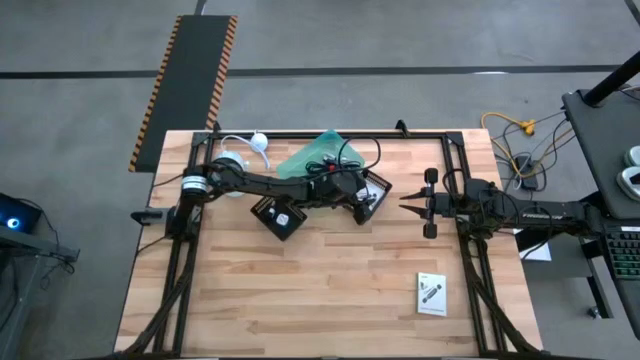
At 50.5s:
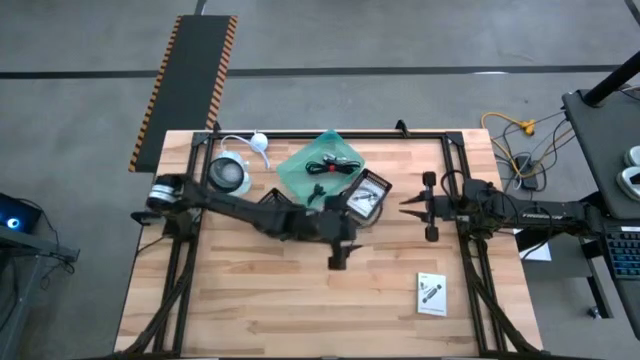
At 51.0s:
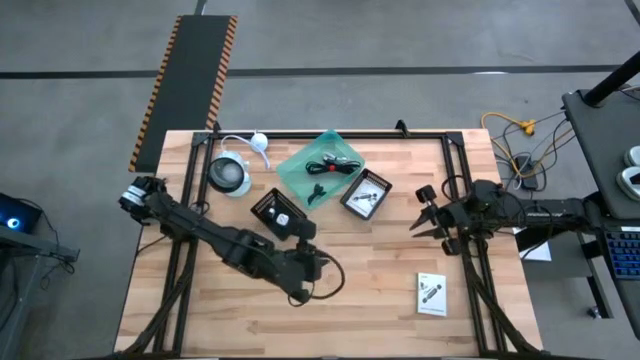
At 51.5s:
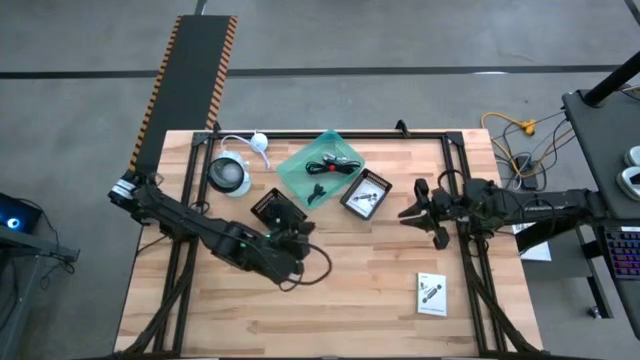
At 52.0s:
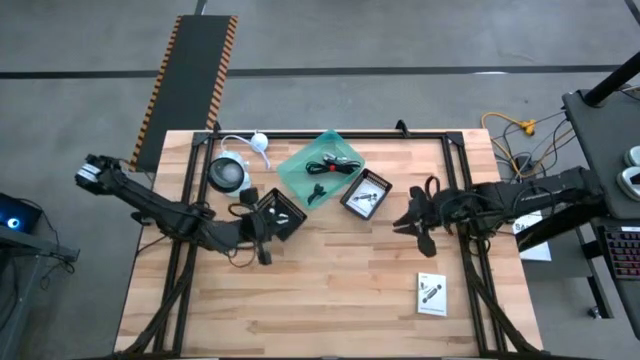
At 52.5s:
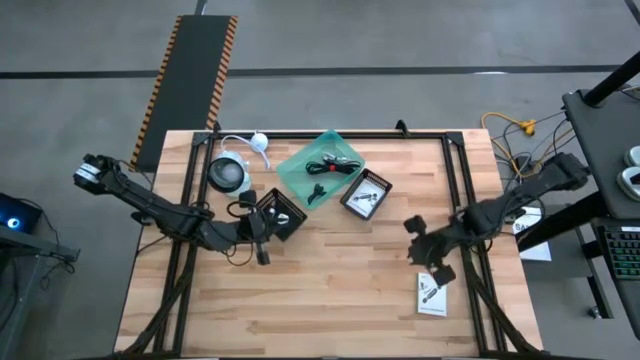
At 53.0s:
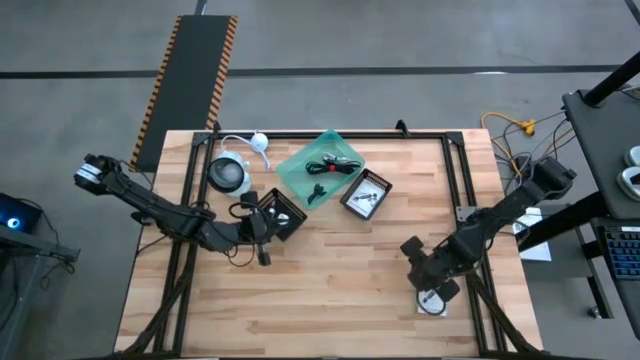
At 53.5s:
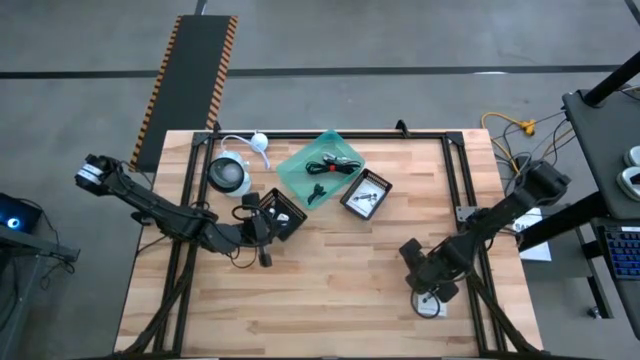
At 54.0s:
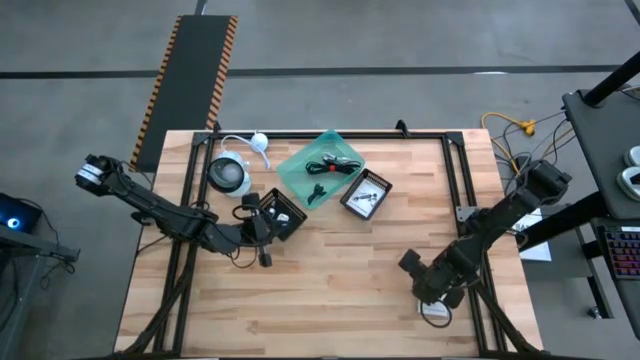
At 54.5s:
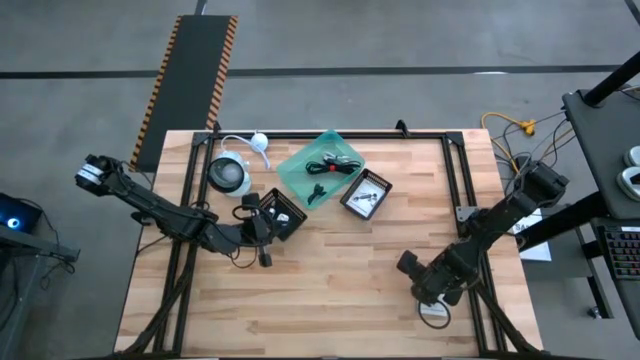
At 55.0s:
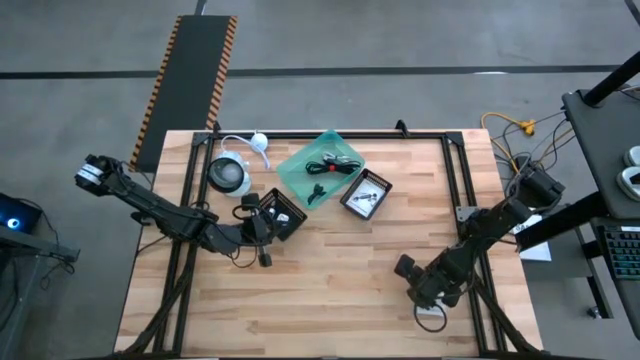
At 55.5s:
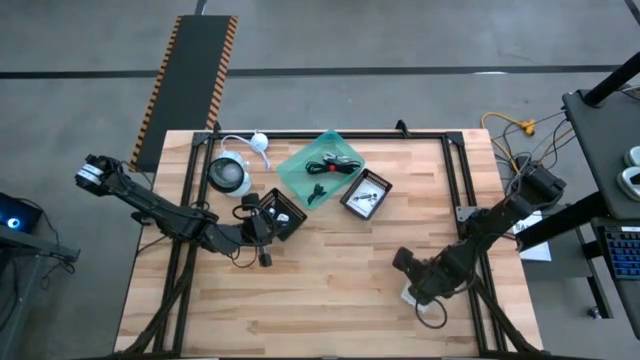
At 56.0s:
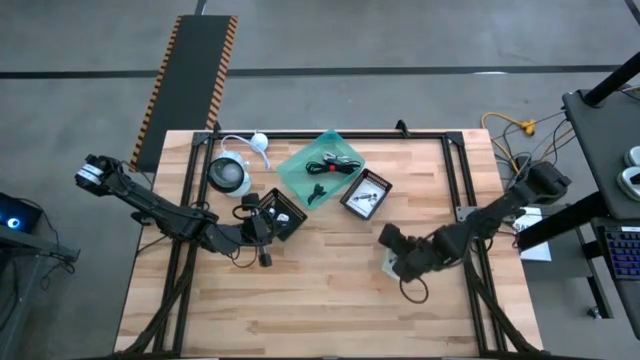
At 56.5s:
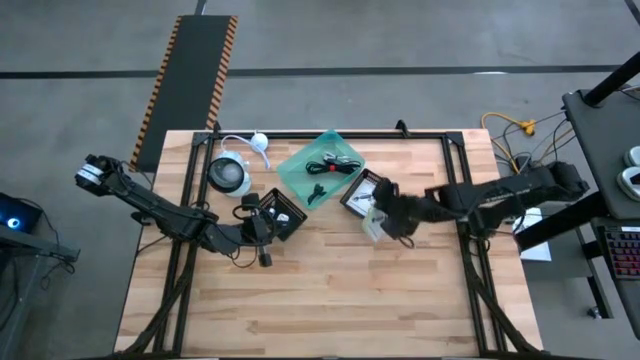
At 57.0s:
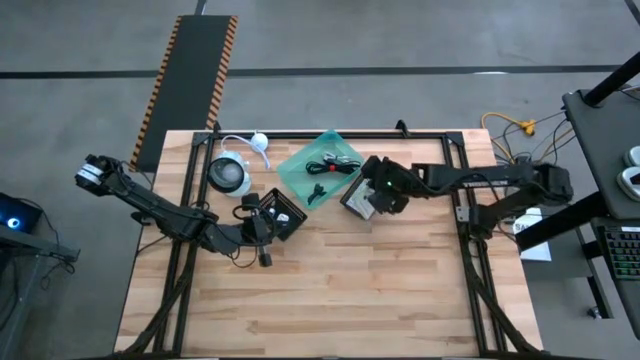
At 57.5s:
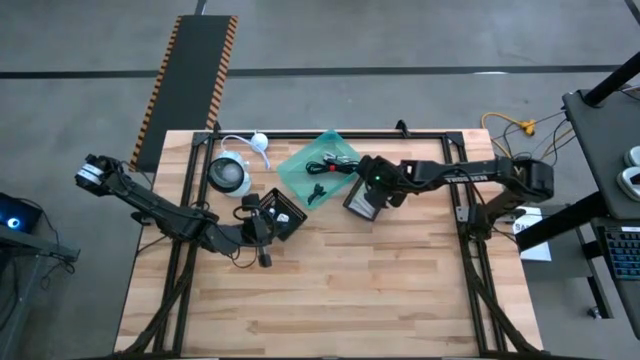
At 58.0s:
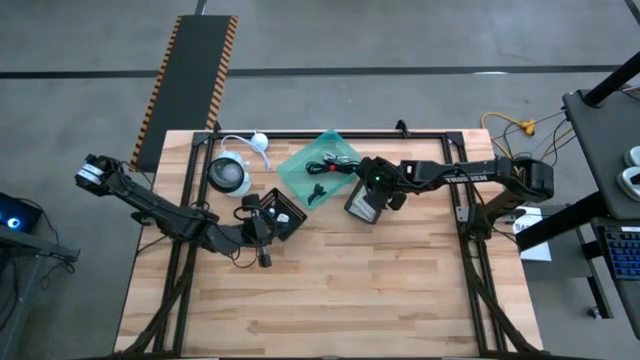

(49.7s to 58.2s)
Task: Pick and place items into bin
Put the card reader box into the right black bin

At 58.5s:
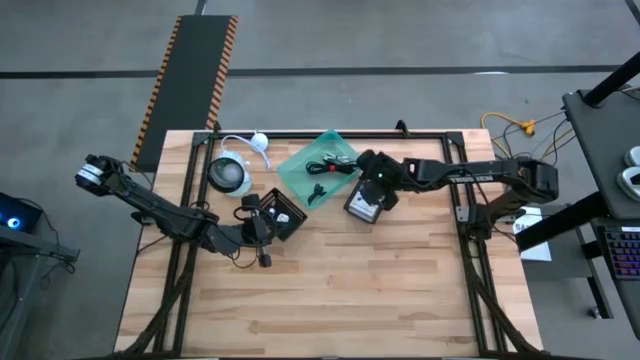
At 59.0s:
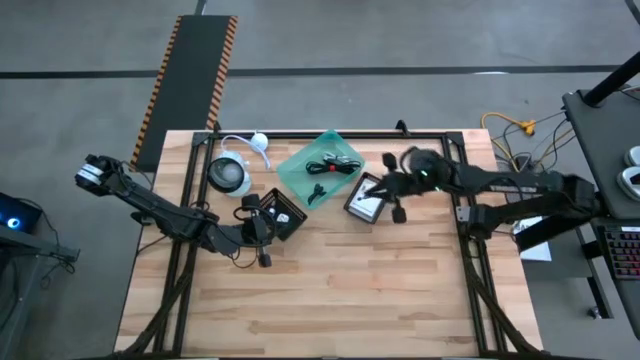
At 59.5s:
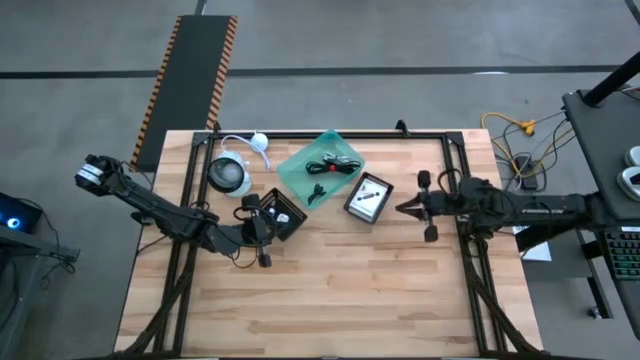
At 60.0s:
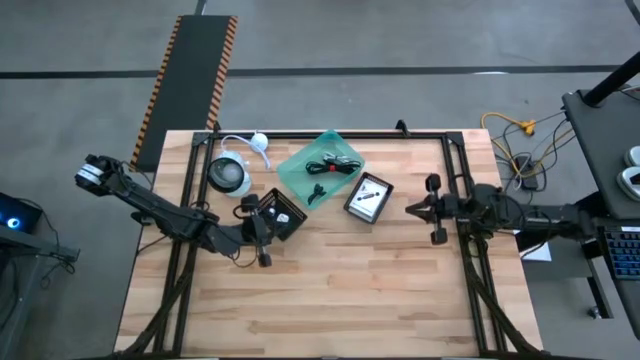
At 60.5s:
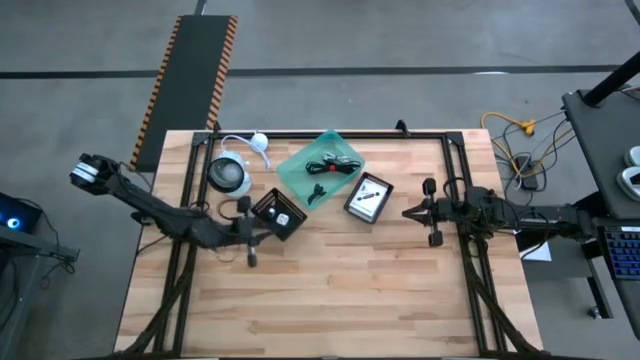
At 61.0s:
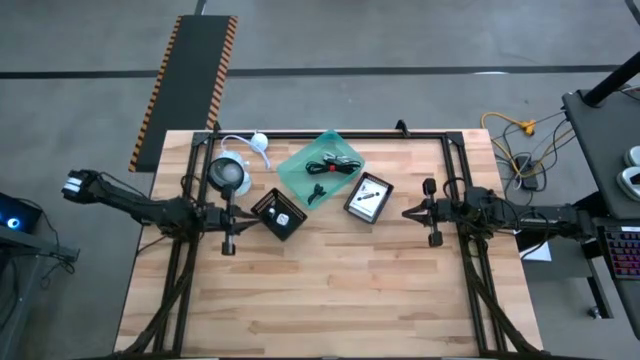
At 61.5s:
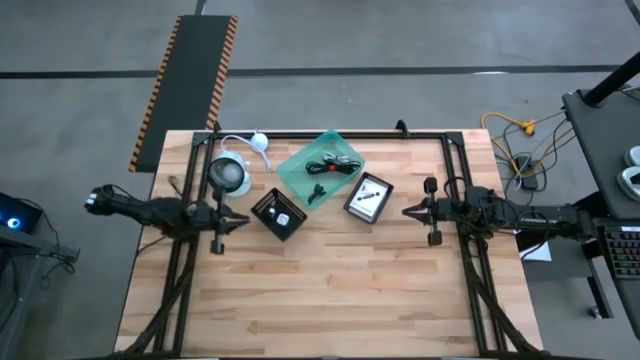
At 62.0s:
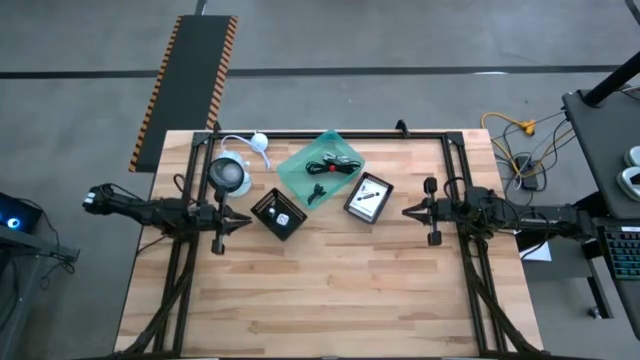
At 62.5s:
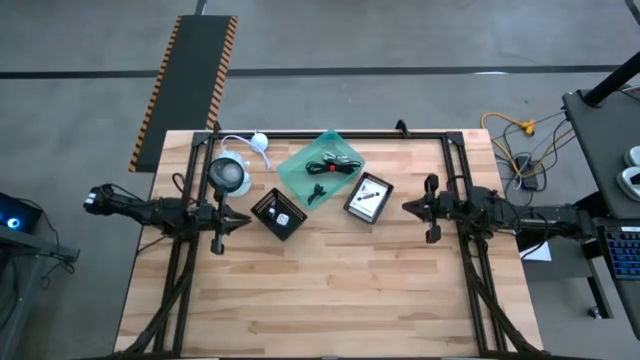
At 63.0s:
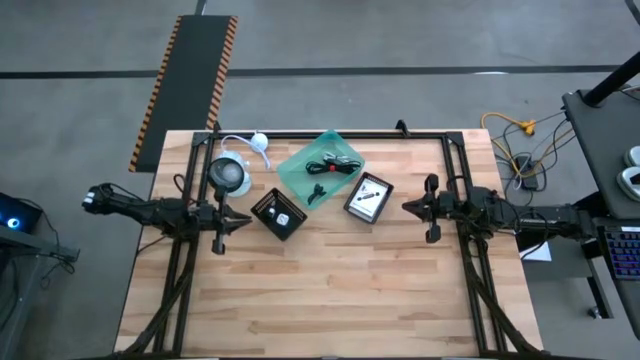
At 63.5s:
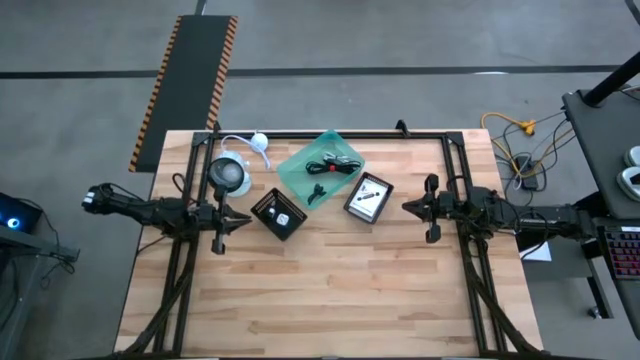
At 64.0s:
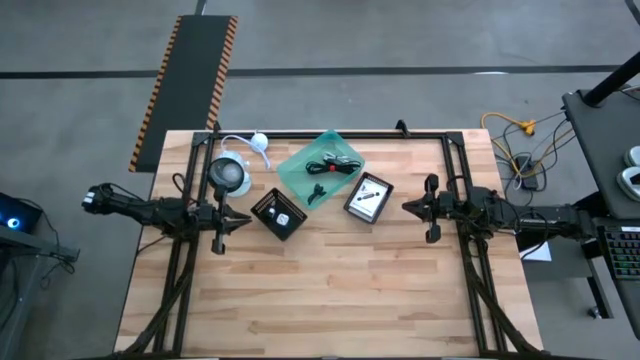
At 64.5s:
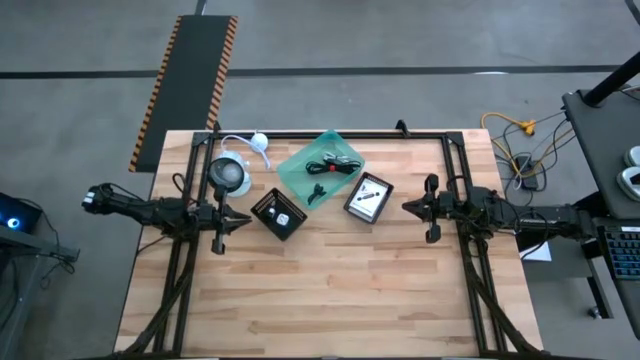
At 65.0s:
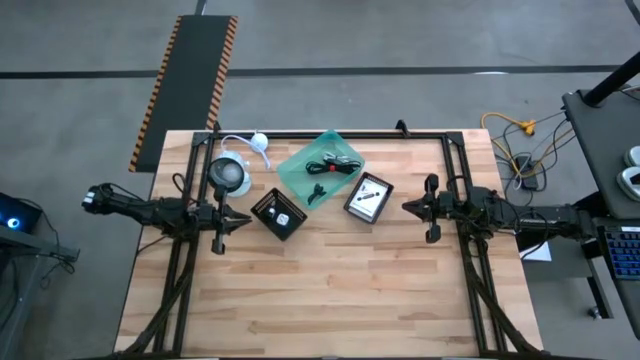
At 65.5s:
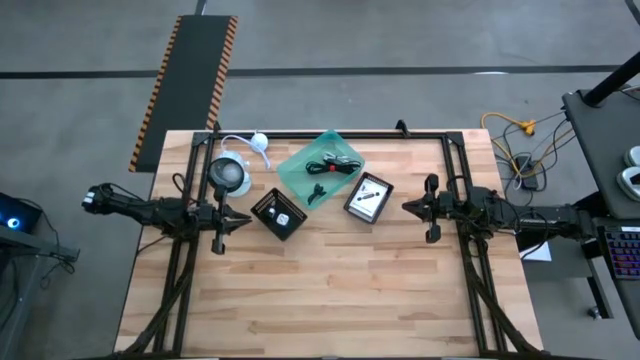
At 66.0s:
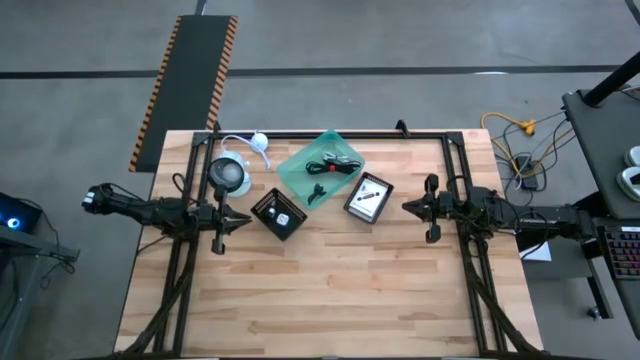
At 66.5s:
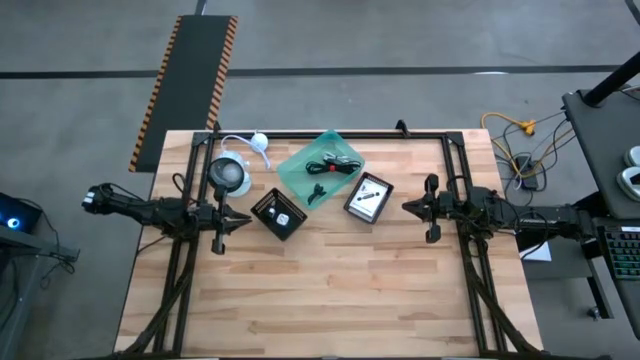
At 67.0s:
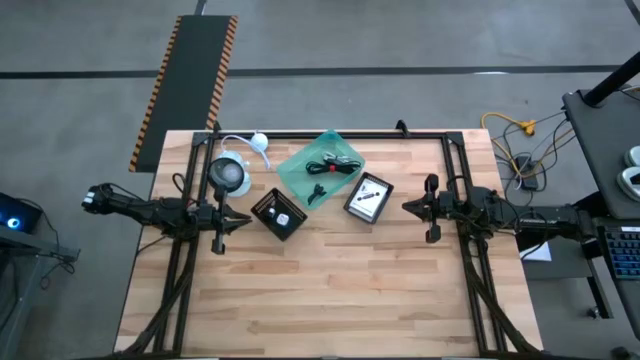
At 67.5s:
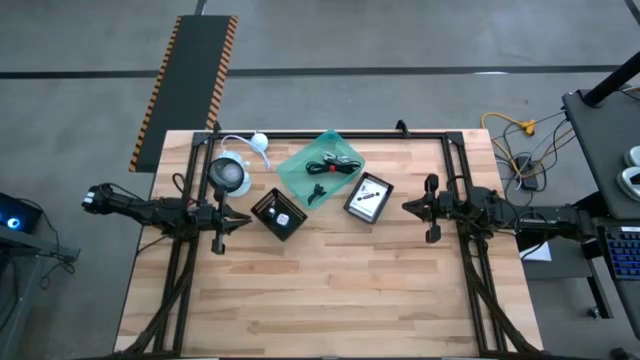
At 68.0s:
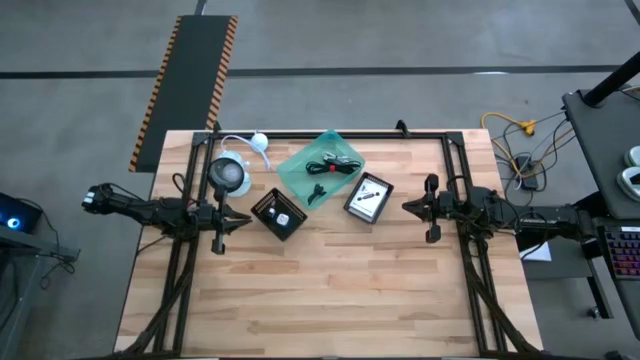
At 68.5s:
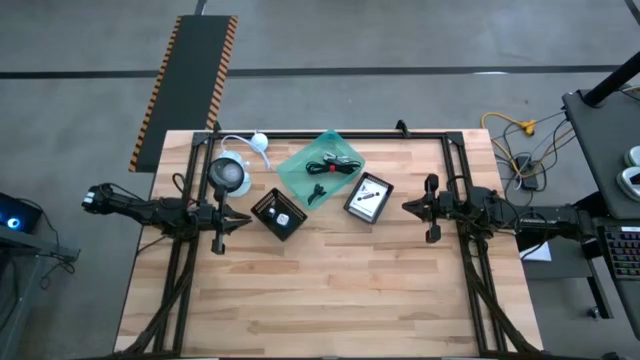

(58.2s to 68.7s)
Return to Home Position
